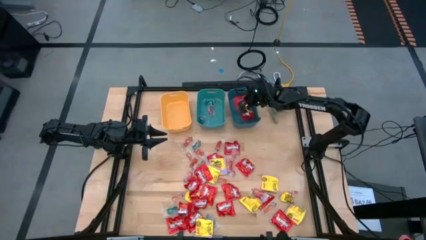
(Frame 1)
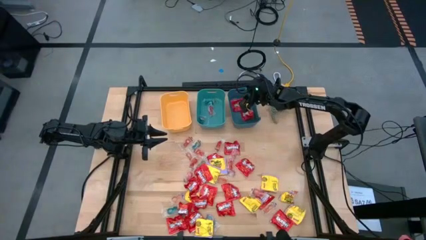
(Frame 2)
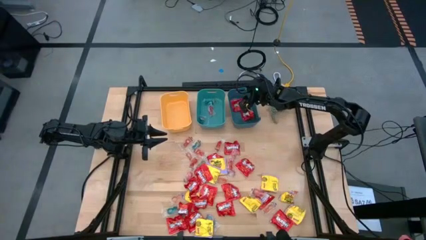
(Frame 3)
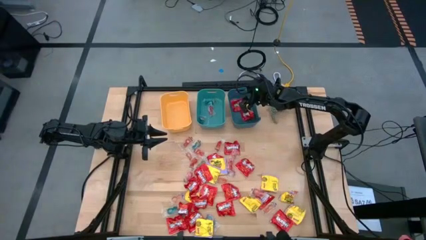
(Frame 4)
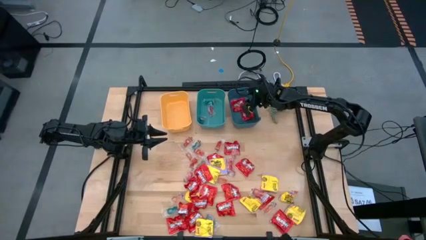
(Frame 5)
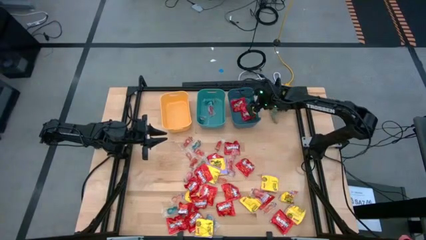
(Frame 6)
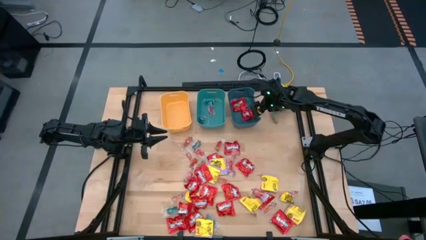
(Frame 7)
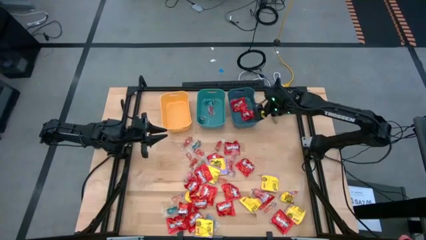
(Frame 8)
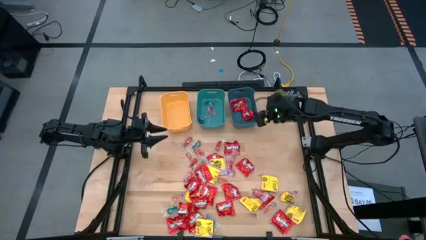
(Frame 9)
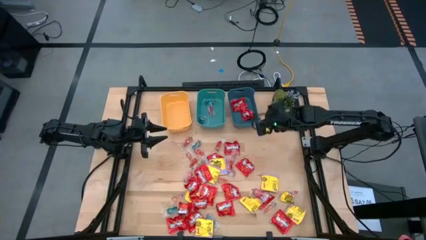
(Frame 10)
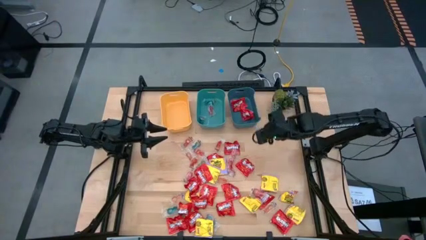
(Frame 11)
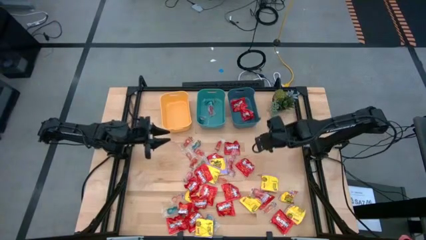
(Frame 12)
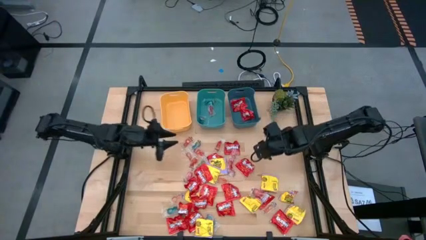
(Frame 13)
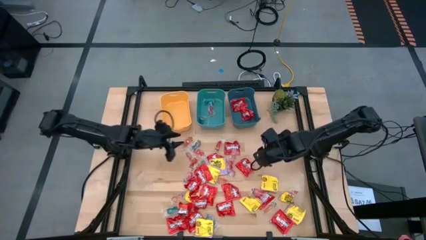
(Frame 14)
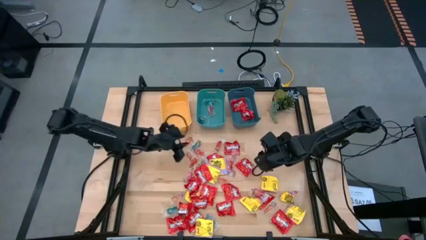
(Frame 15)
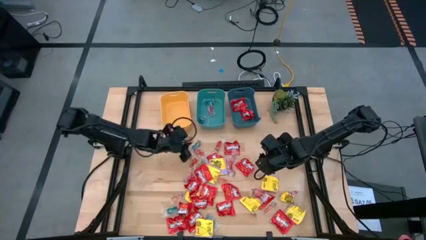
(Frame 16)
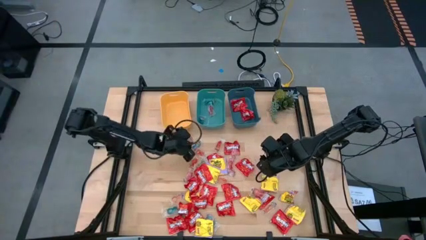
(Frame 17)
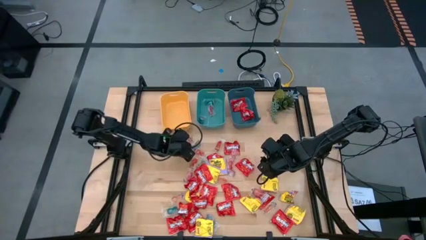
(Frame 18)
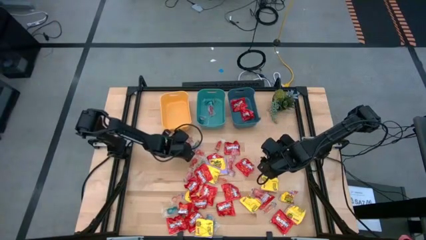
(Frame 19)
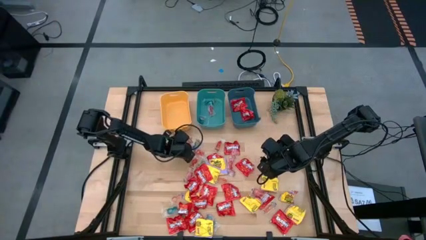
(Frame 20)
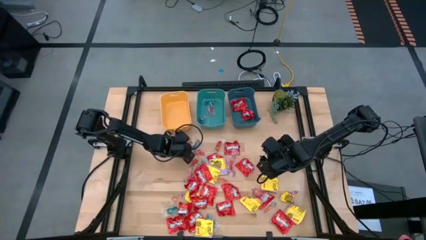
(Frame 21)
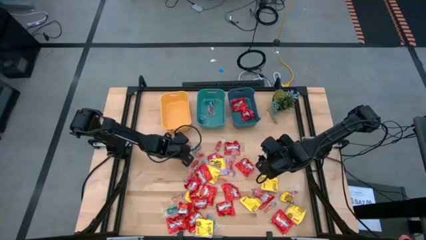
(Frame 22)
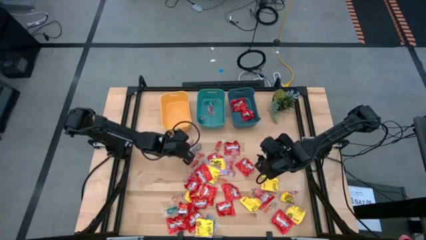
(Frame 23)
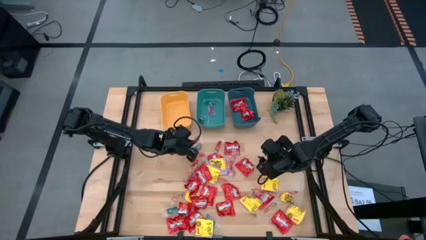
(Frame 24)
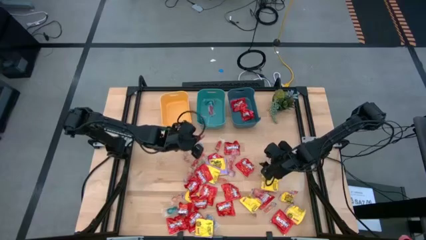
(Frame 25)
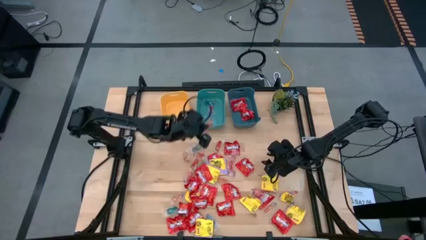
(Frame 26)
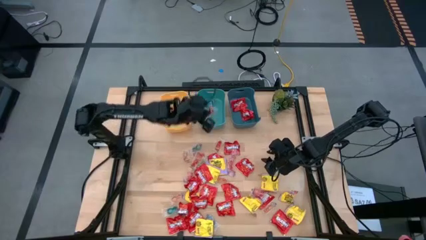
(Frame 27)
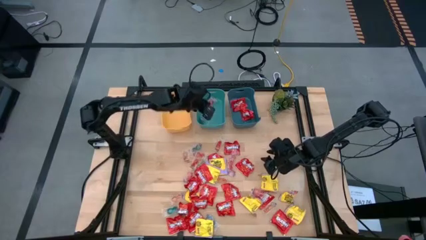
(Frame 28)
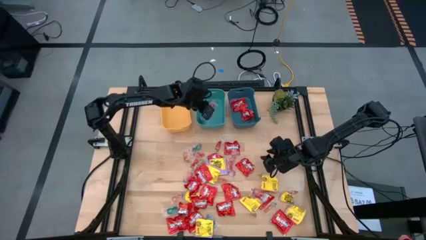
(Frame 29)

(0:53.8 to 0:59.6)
Task: Sort candy
Put the orange gummy candy into the green bin

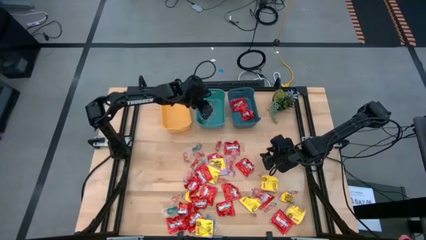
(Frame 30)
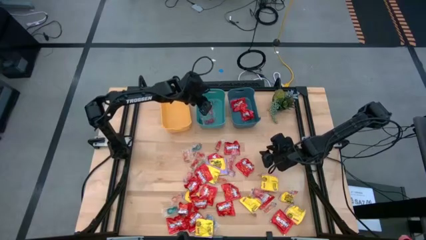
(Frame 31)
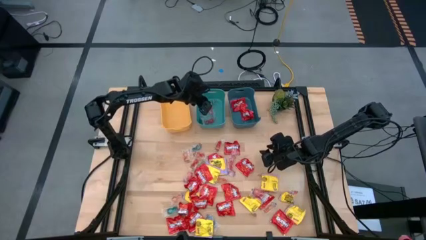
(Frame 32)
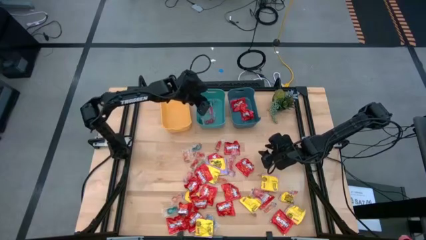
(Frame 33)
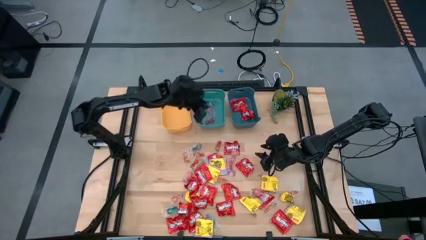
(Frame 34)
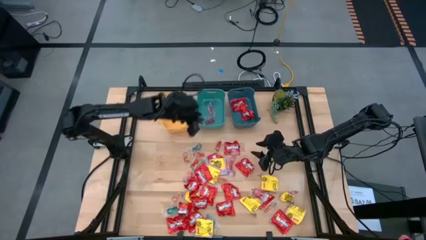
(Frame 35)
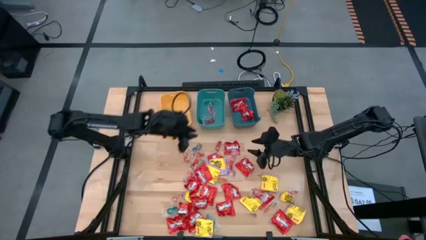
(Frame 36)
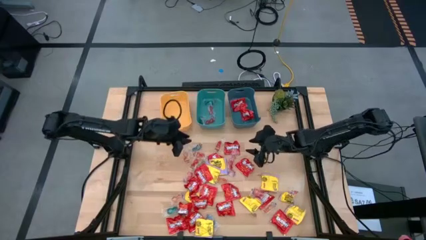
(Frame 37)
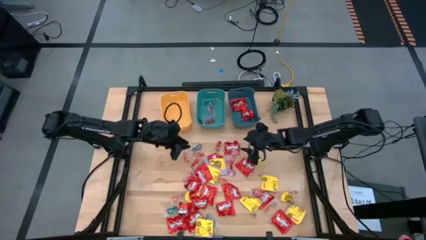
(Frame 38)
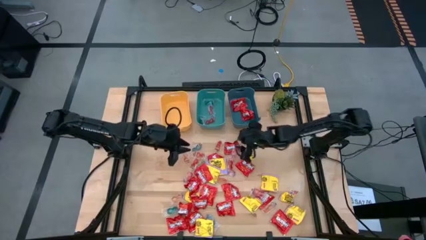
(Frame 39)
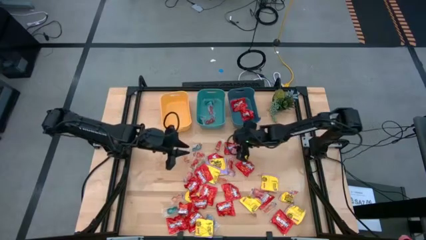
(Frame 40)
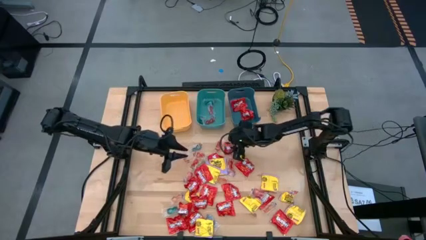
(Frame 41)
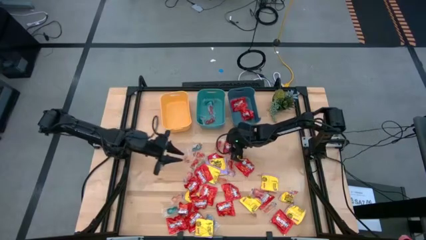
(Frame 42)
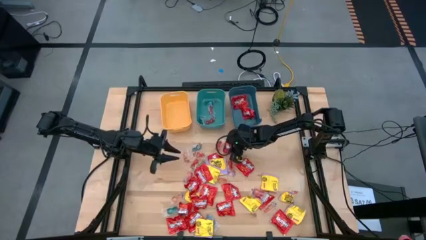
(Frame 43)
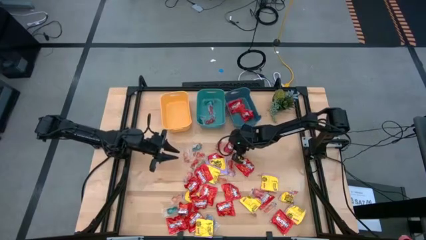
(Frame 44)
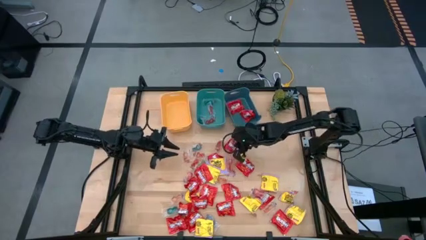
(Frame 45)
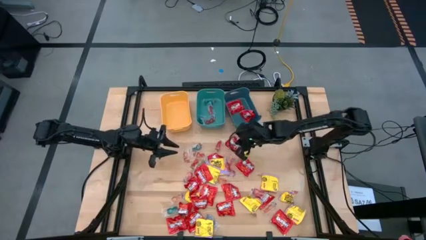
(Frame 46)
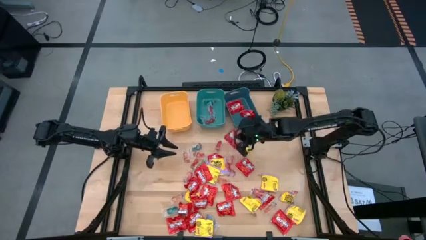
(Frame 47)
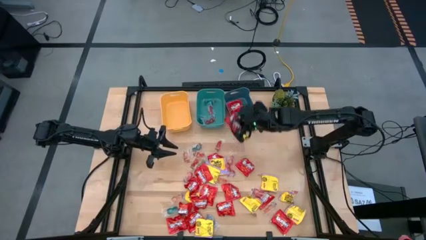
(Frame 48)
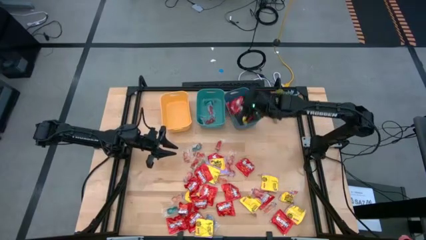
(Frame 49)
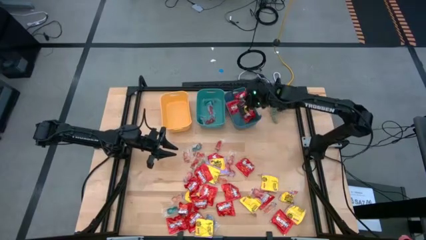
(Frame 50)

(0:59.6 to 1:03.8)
Put the red candy into the blue bin

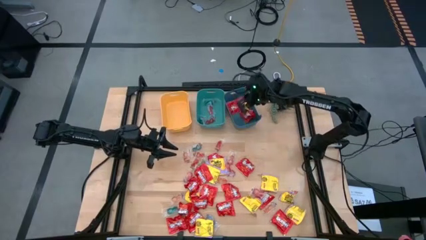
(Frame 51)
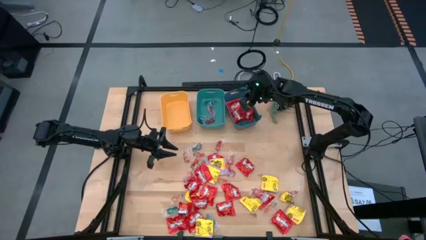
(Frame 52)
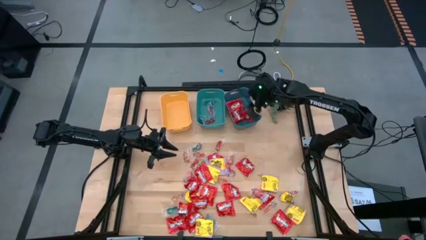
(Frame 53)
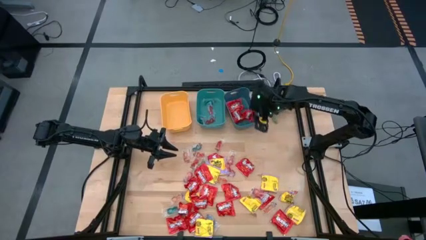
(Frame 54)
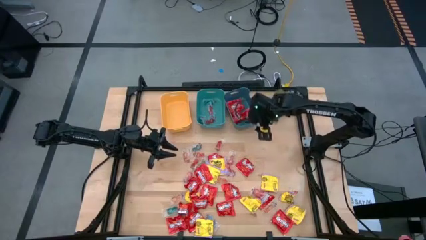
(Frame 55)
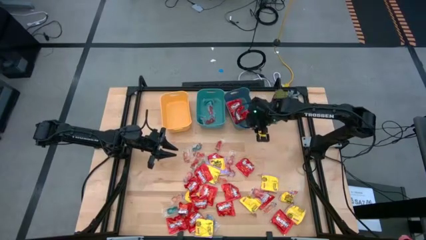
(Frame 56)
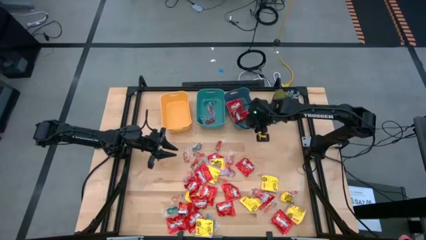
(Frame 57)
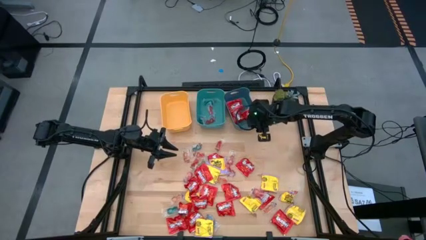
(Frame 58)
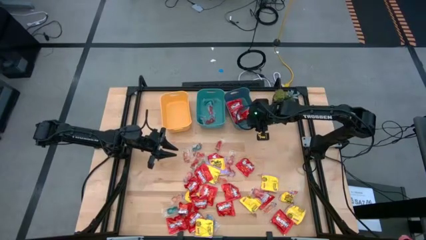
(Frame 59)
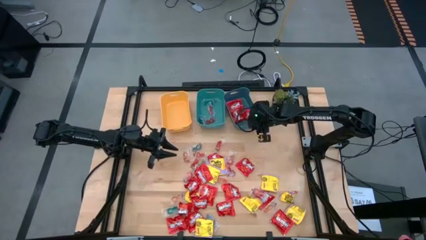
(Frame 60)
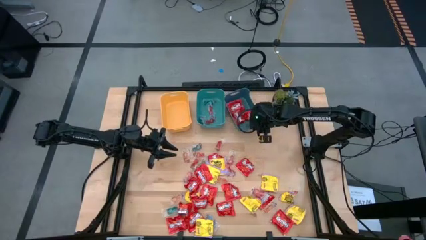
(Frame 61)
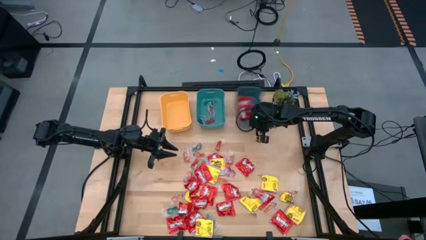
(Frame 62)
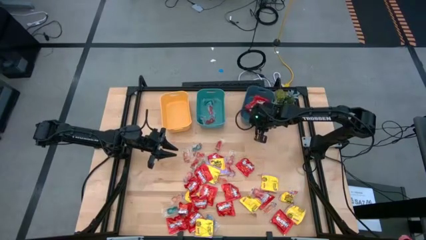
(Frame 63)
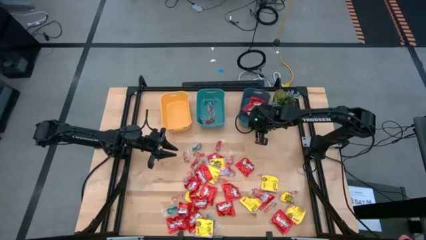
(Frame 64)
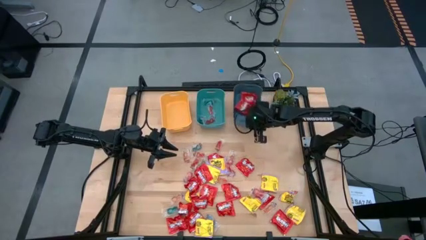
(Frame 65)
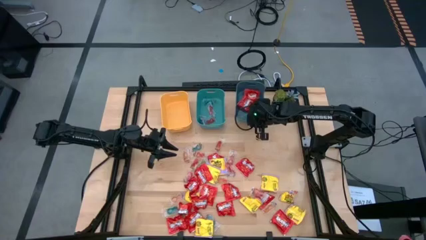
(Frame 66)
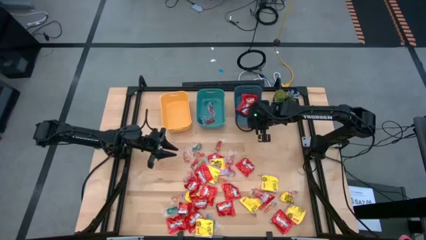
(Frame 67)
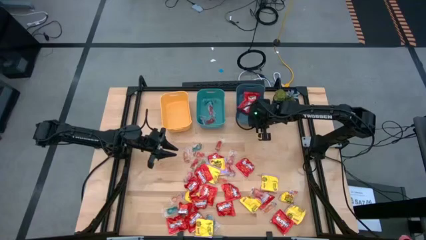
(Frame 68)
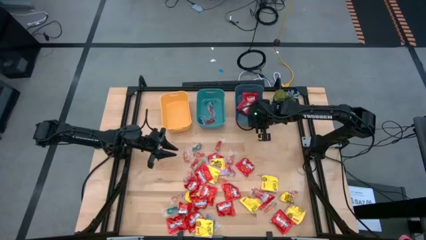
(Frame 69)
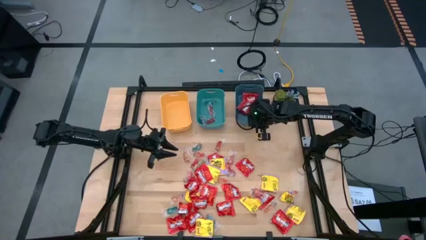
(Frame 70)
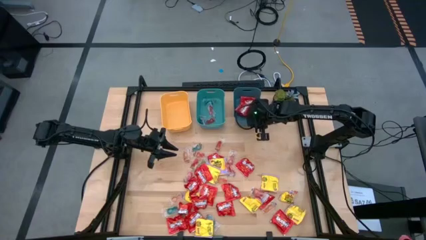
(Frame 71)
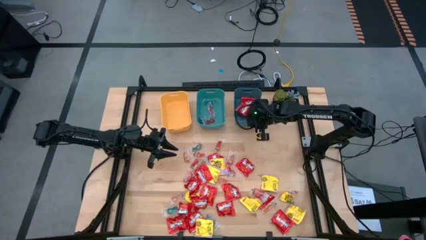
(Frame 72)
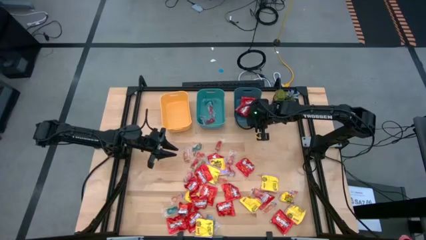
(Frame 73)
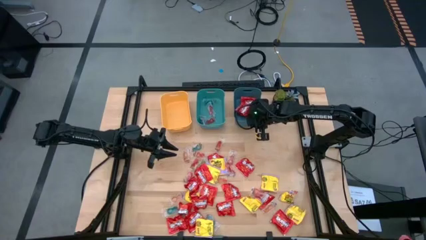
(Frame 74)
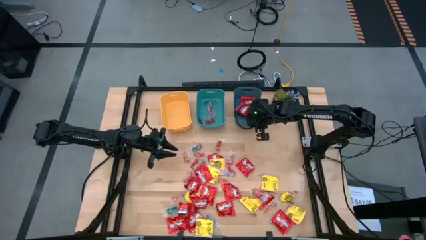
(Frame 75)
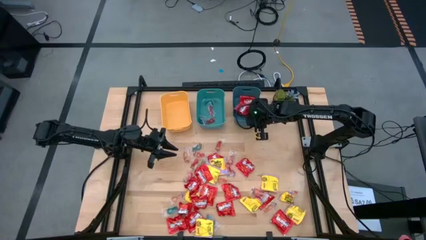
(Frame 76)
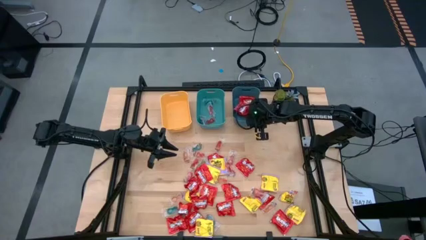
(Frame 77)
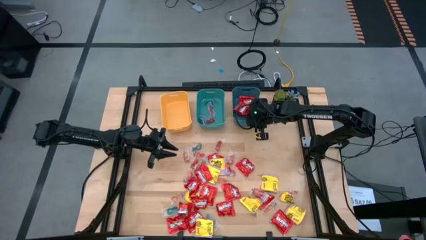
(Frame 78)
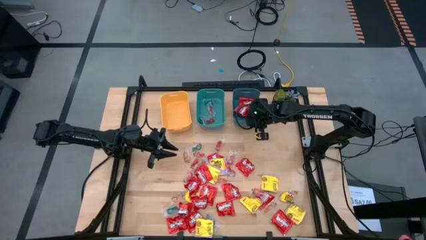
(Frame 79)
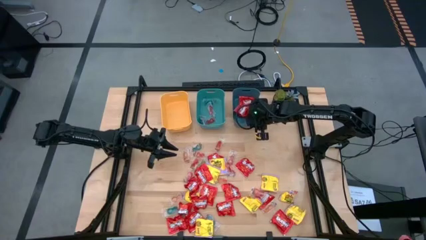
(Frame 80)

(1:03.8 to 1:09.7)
Adjust the blue bin
